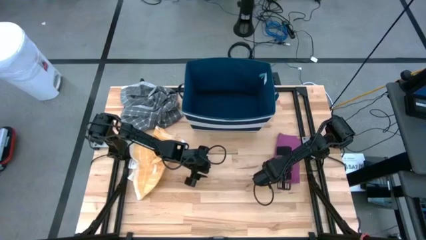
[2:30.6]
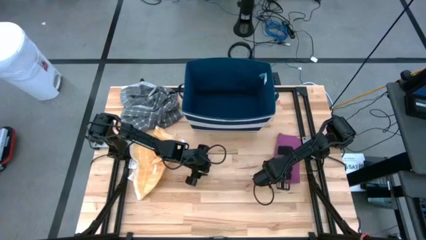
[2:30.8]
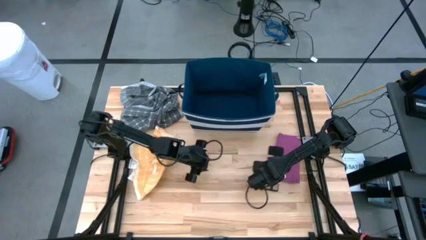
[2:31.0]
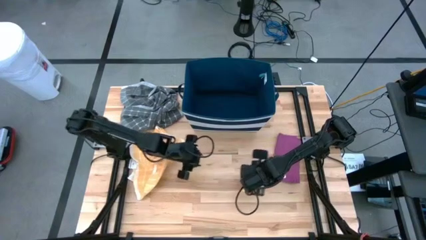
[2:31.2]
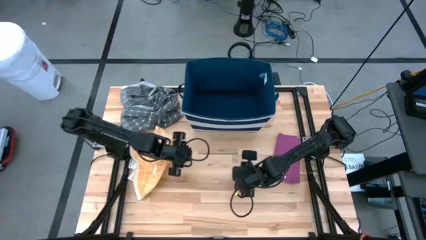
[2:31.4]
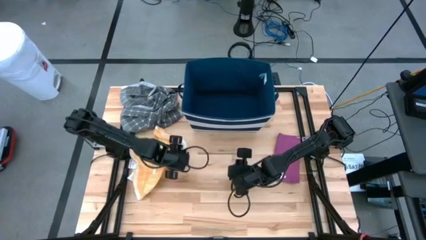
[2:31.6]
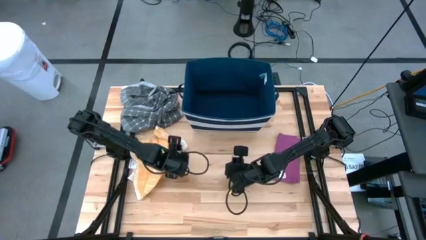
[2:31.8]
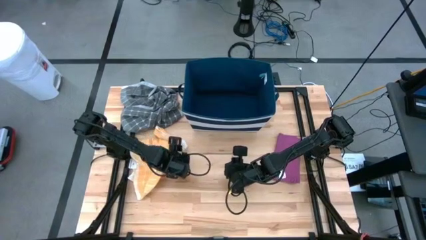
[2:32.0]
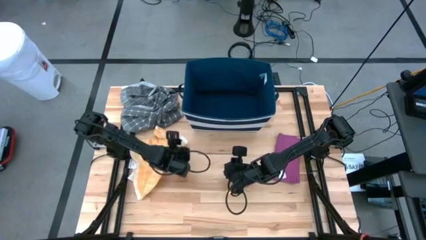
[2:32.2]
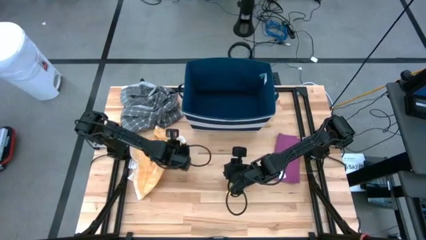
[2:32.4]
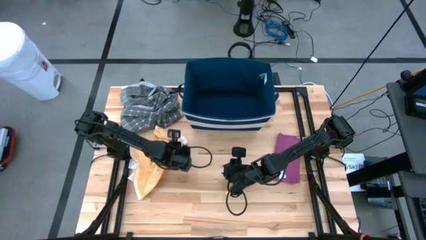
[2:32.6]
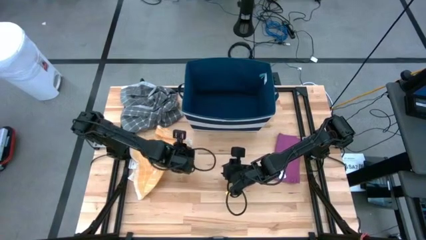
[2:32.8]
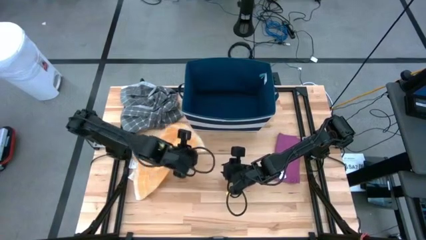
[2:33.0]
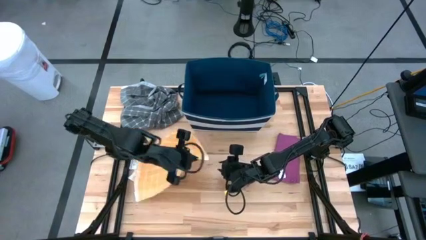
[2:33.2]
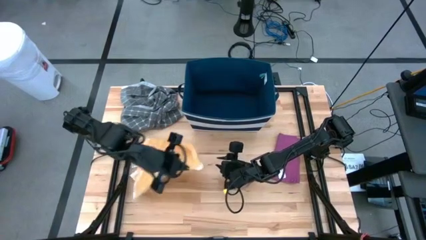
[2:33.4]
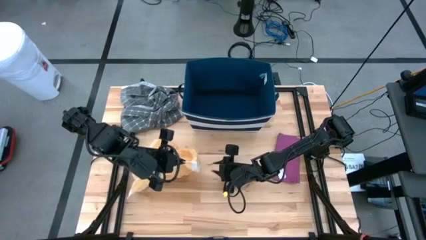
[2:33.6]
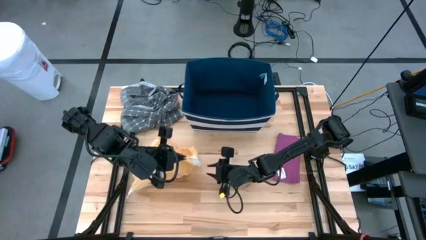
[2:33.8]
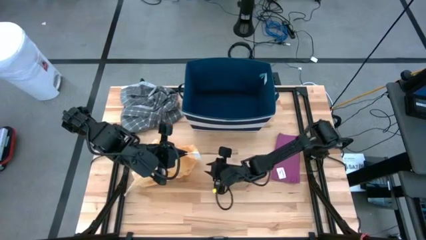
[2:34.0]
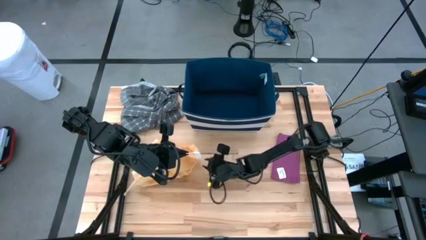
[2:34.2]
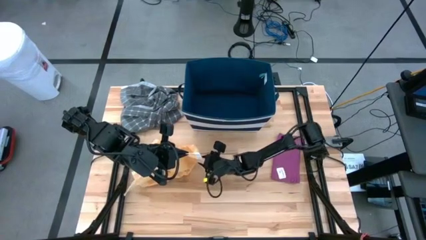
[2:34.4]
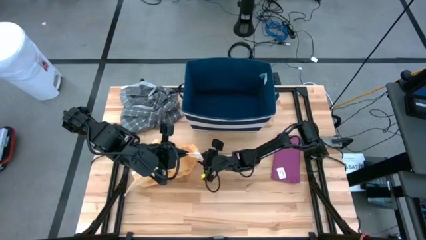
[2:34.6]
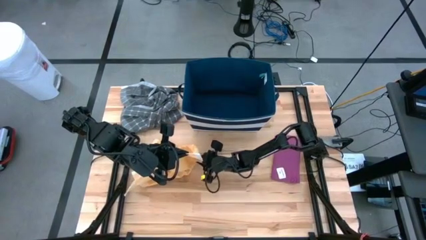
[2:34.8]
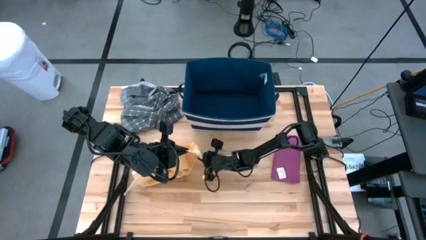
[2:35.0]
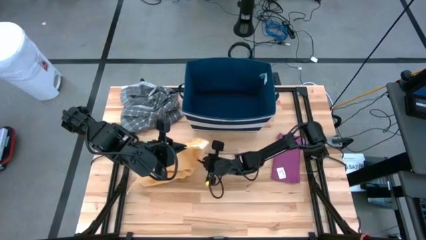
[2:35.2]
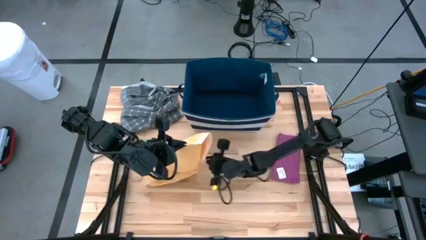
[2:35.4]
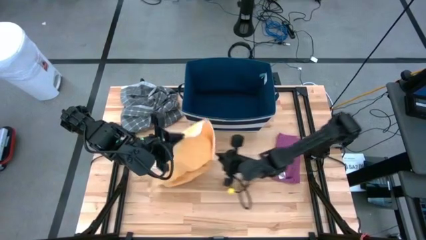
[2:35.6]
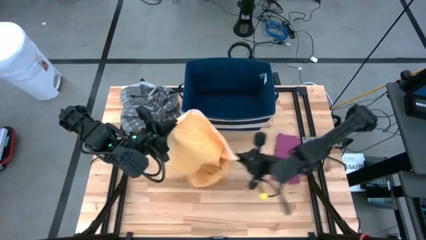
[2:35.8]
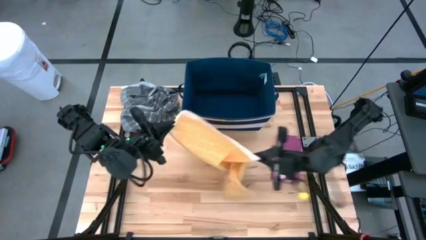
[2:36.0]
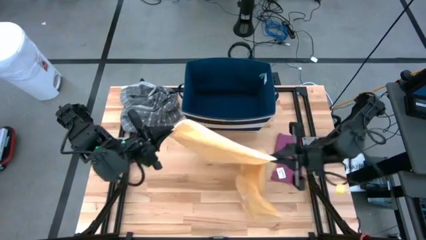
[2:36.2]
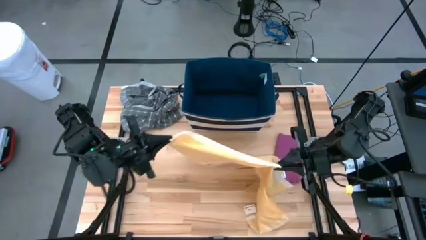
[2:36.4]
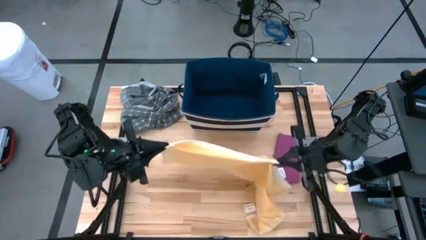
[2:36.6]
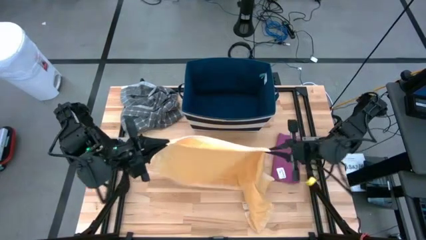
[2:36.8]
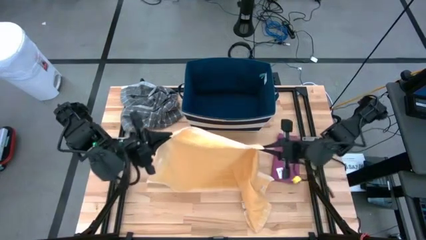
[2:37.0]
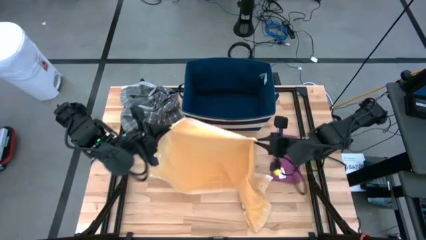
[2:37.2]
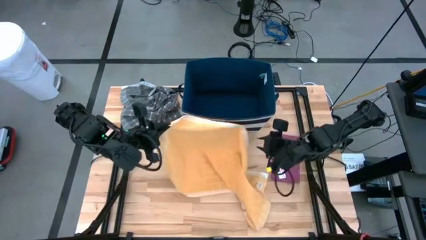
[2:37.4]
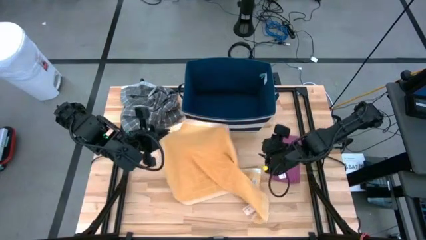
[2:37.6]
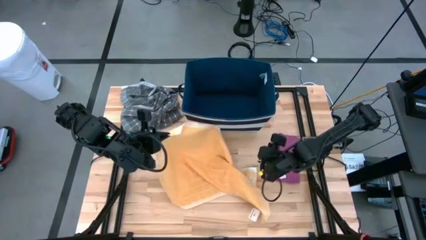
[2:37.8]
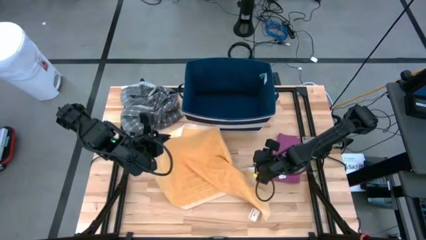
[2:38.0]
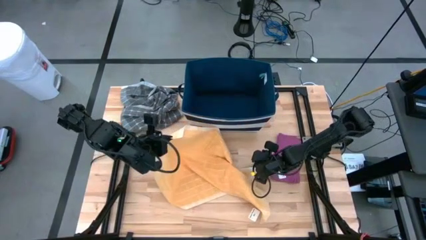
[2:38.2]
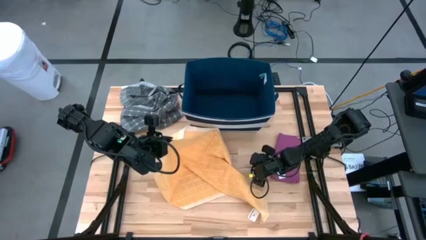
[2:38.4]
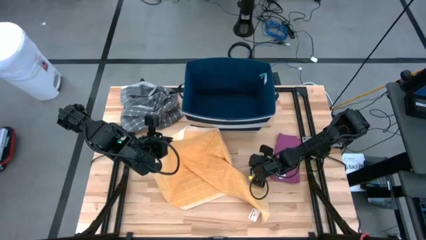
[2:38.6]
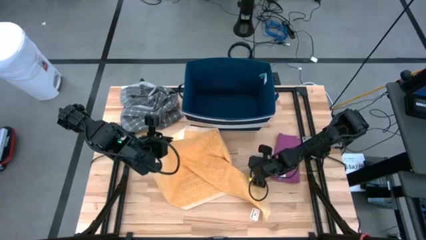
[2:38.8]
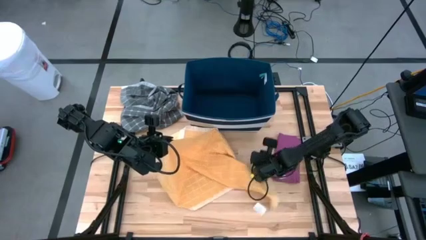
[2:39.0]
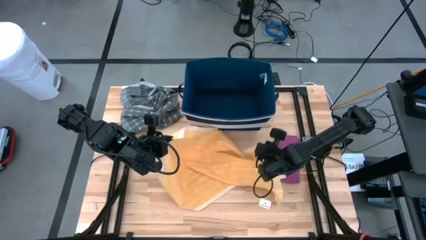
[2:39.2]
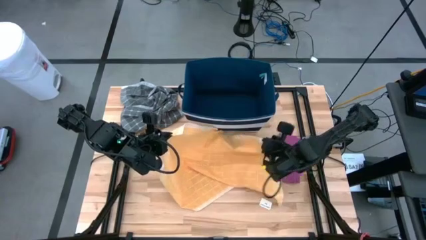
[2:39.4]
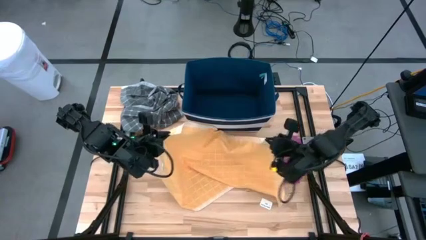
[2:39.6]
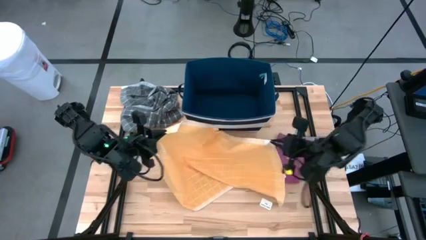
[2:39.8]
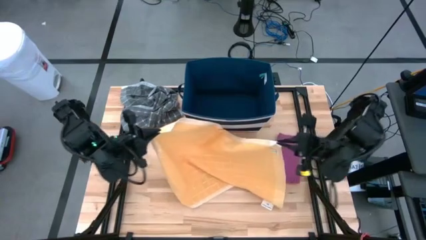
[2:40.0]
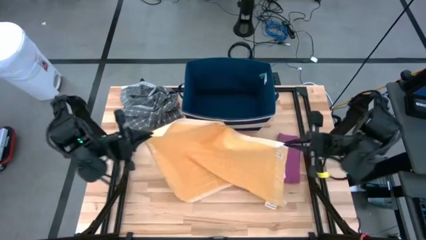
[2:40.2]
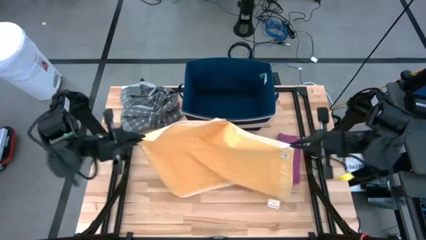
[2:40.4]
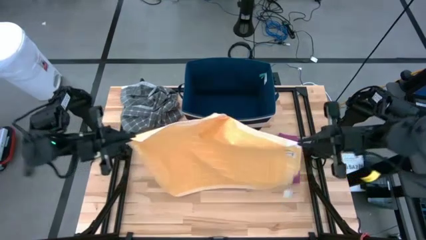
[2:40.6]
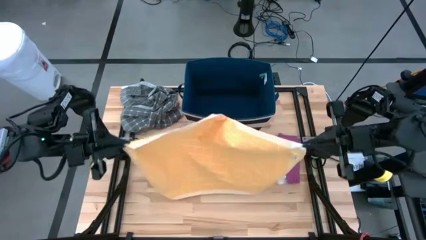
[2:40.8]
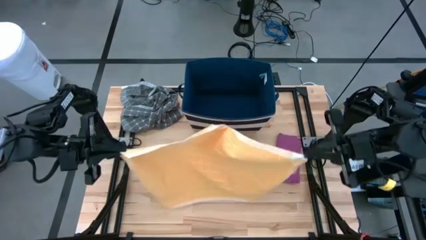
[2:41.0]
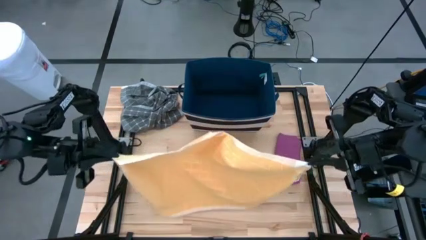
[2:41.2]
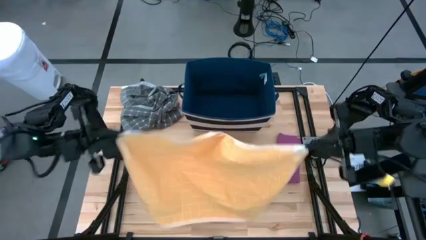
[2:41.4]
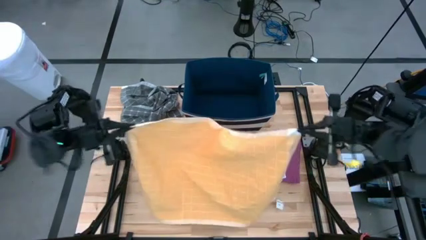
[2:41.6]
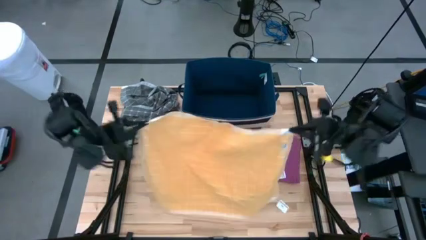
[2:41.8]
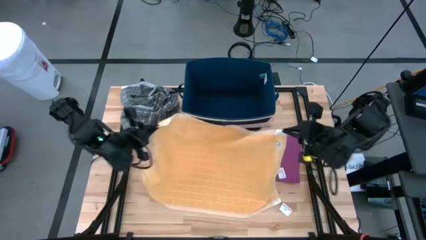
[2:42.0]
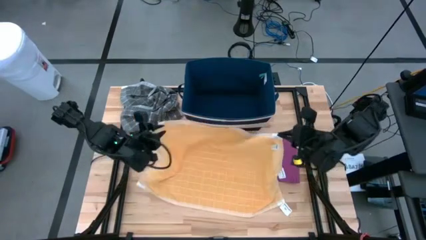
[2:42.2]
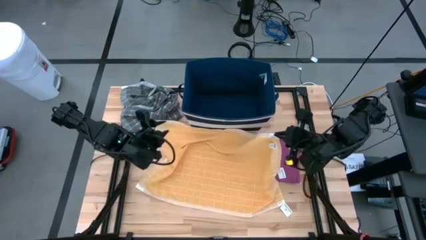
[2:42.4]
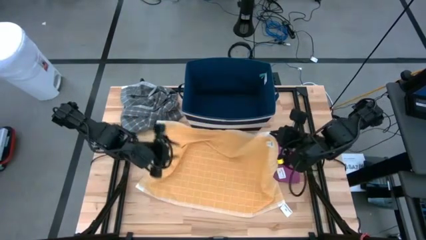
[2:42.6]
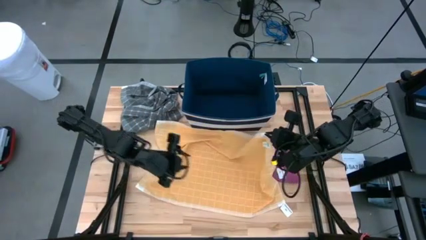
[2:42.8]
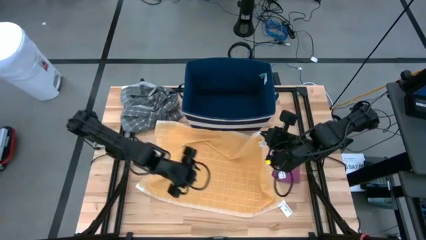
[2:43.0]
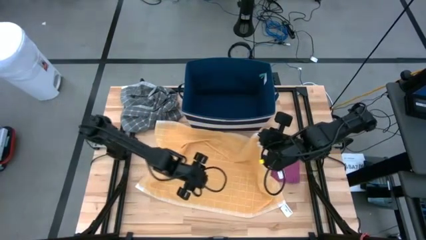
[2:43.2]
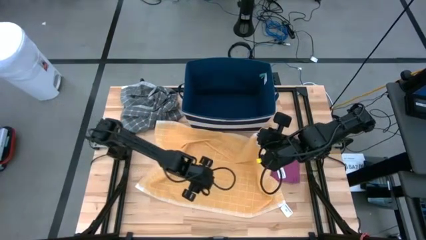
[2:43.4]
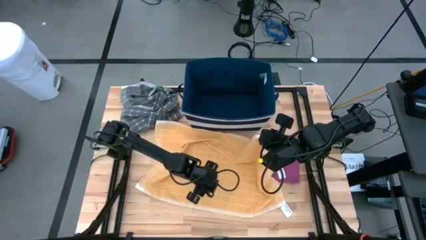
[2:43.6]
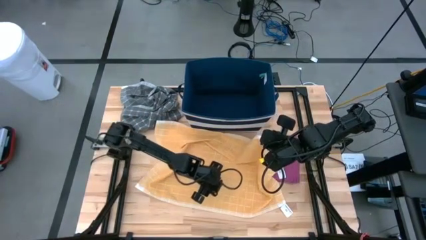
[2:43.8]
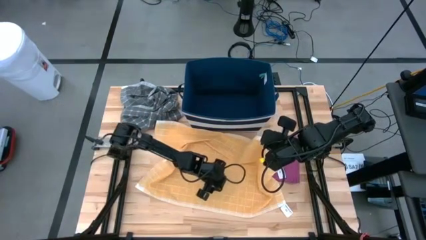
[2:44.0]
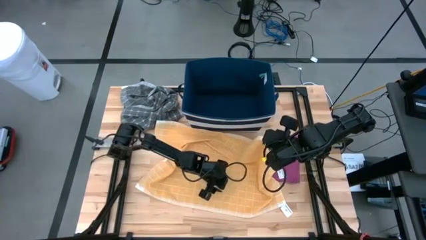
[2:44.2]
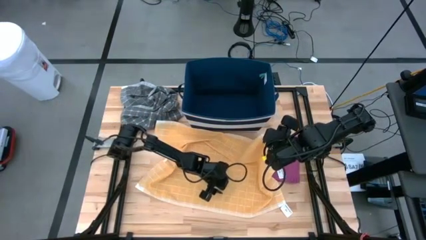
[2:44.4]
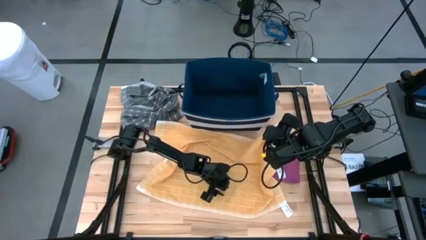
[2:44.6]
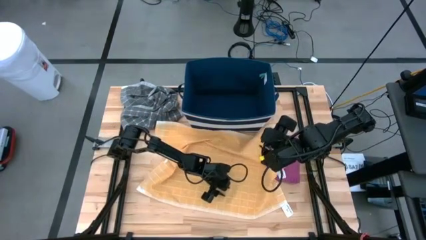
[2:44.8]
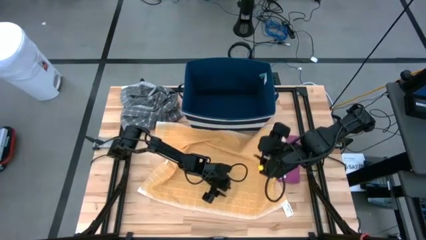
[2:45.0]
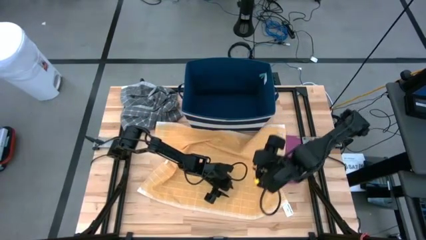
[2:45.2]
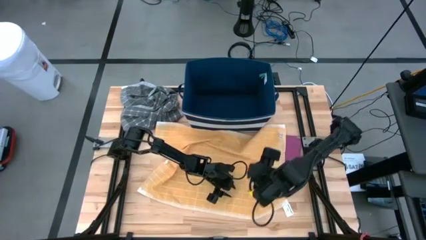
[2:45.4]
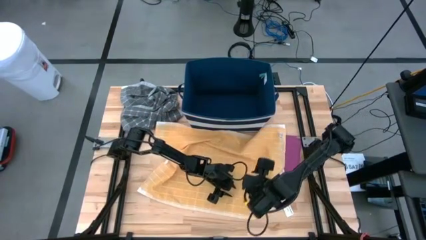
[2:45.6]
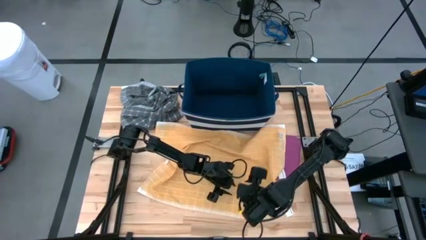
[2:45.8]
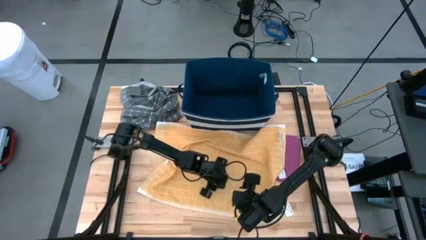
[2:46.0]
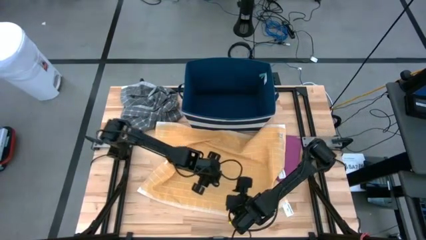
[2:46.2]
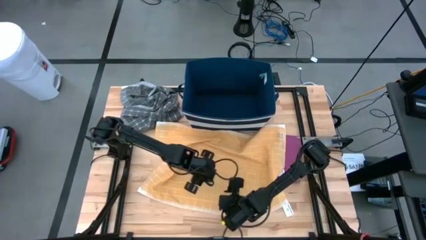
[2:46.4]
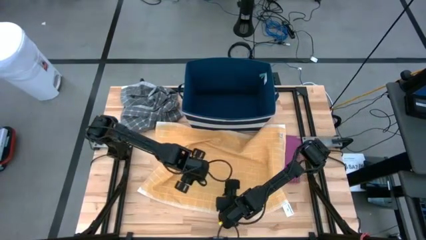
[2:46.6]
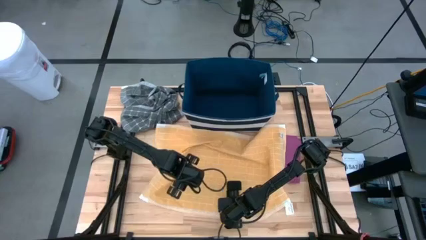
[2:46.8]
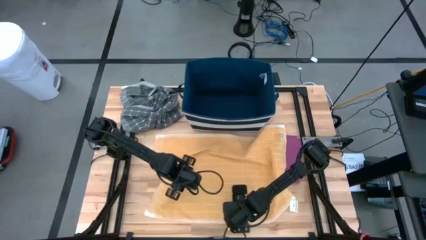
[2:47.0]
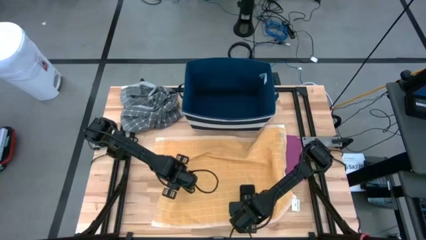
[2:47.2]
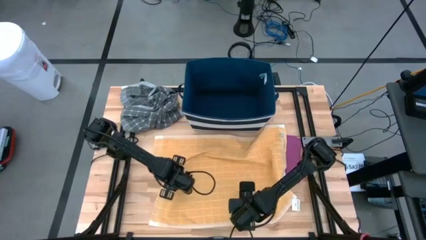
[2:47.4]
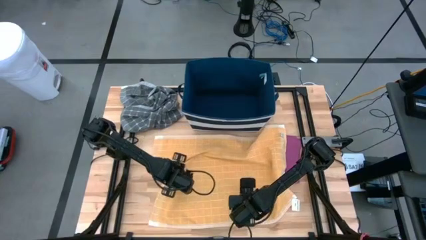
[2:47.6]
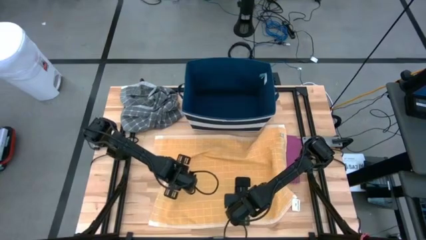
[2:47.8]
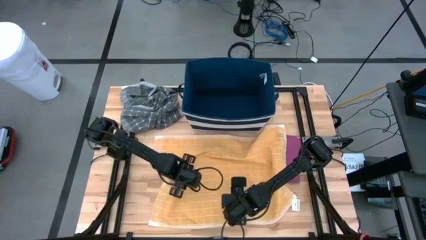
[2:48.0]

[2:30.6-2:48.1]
Task: Fold towel
Fold the yellow towel
